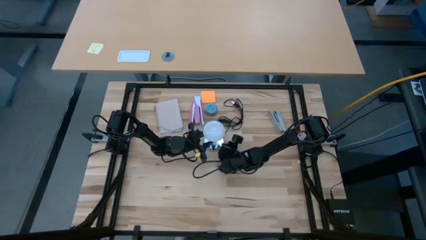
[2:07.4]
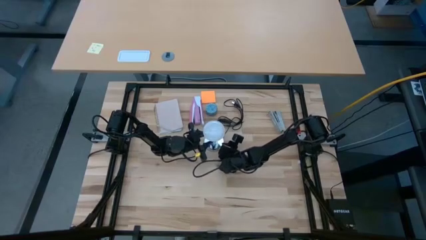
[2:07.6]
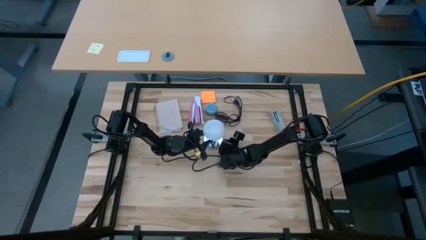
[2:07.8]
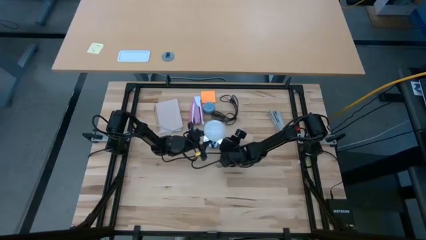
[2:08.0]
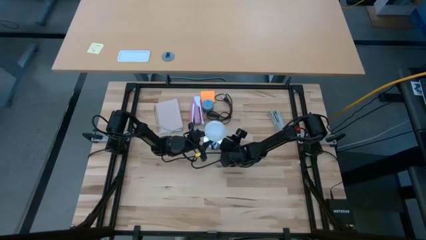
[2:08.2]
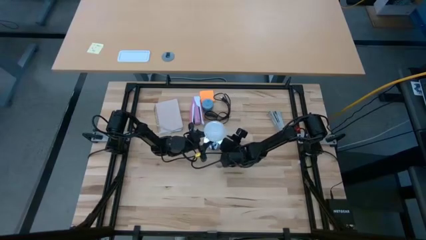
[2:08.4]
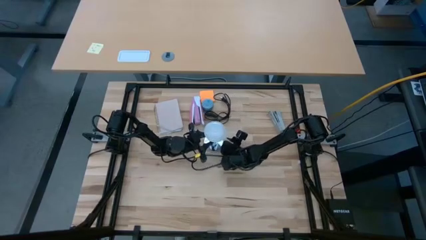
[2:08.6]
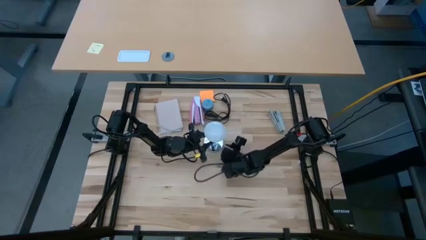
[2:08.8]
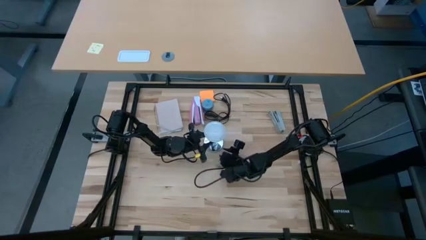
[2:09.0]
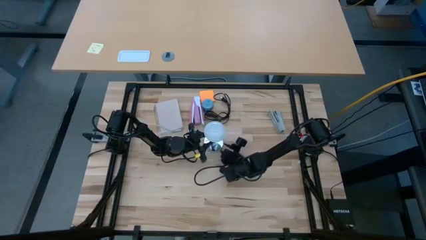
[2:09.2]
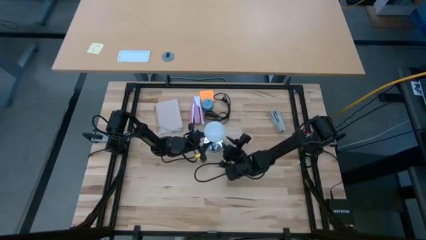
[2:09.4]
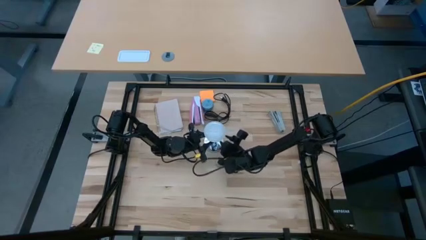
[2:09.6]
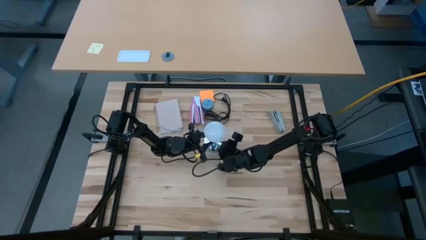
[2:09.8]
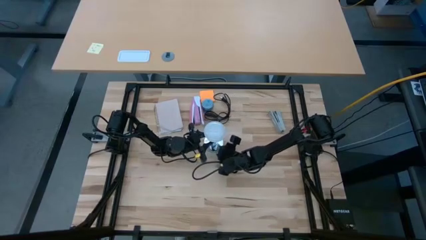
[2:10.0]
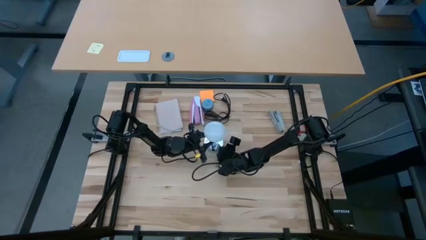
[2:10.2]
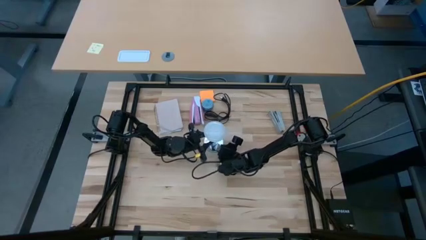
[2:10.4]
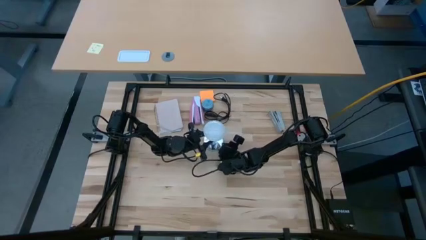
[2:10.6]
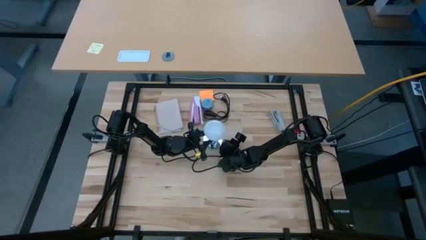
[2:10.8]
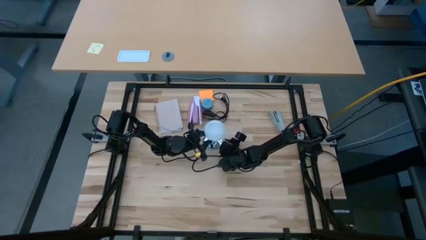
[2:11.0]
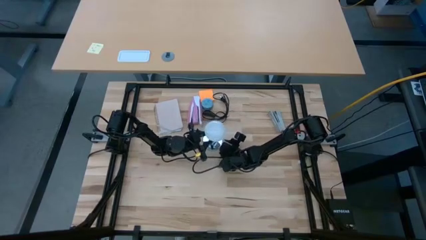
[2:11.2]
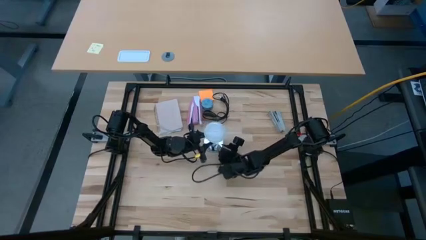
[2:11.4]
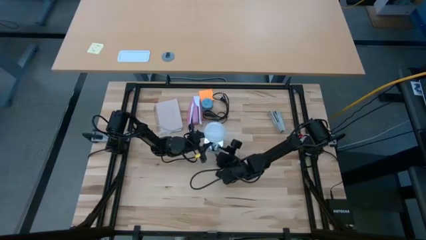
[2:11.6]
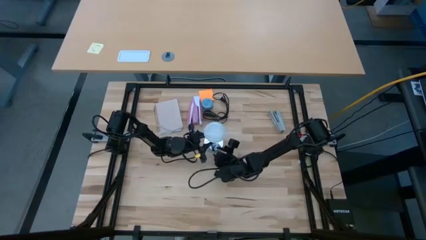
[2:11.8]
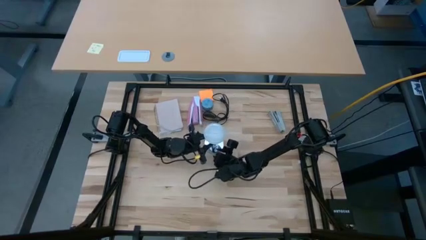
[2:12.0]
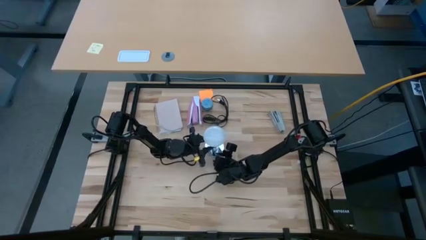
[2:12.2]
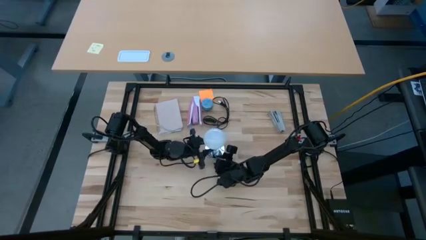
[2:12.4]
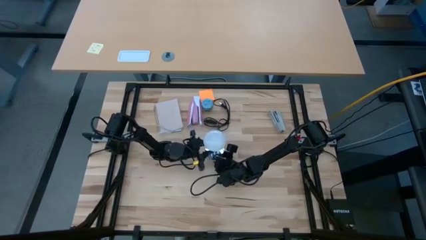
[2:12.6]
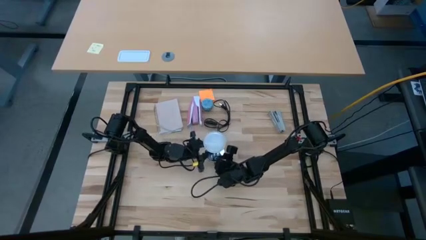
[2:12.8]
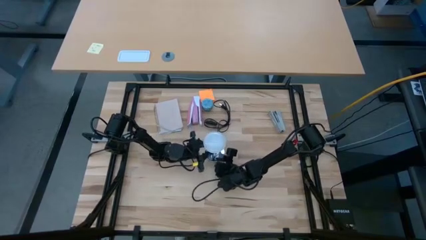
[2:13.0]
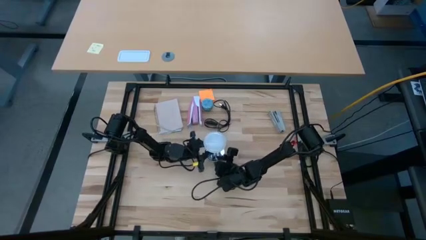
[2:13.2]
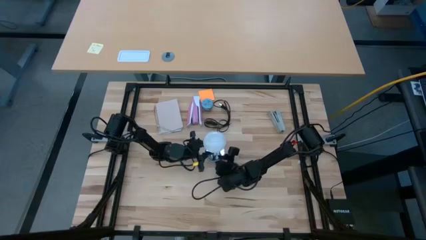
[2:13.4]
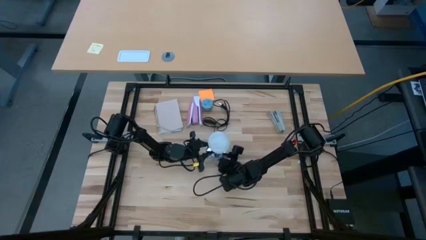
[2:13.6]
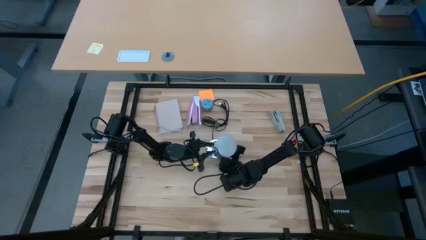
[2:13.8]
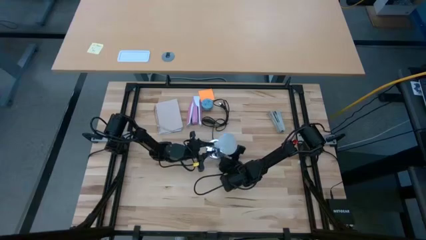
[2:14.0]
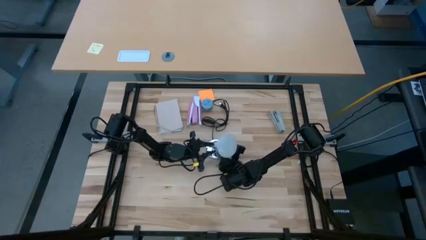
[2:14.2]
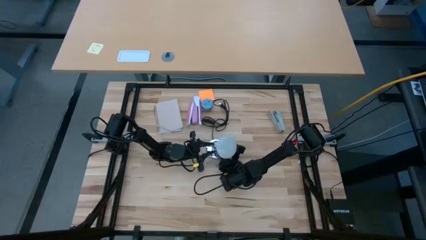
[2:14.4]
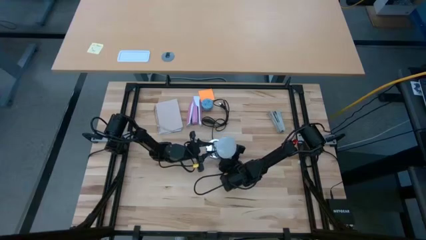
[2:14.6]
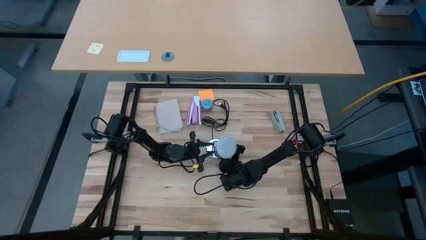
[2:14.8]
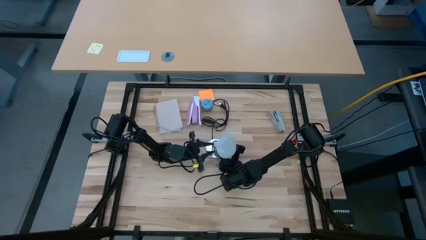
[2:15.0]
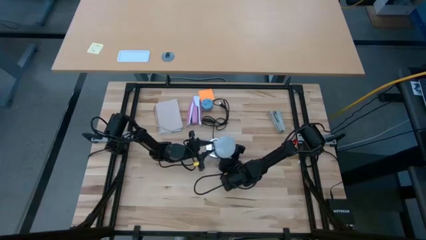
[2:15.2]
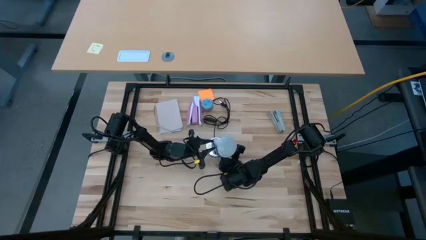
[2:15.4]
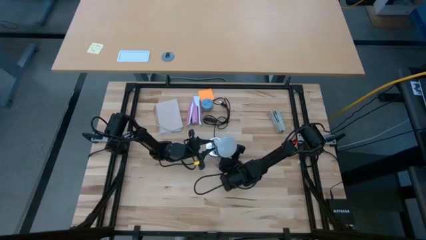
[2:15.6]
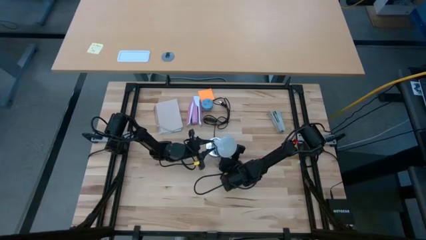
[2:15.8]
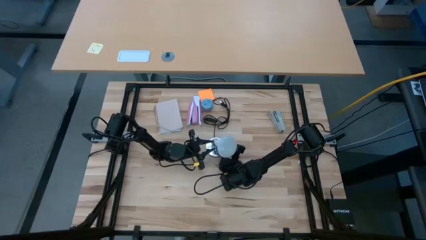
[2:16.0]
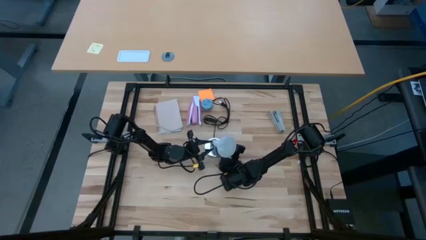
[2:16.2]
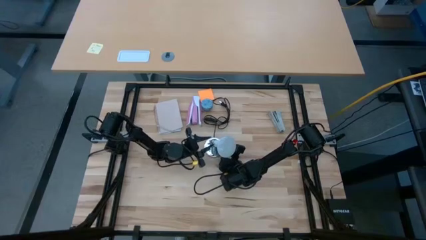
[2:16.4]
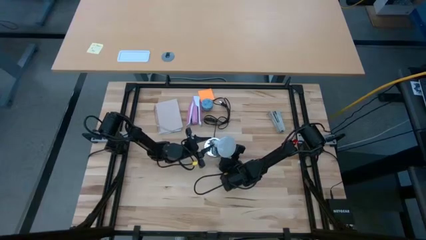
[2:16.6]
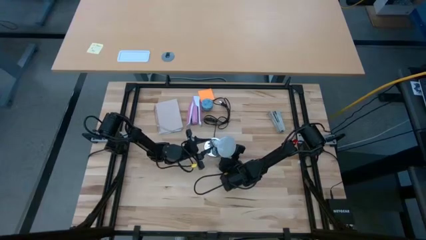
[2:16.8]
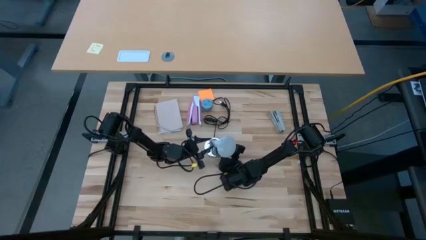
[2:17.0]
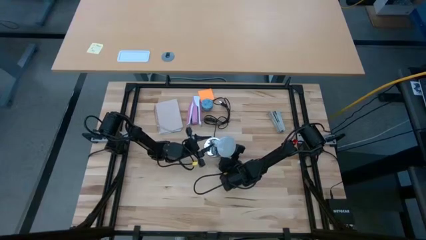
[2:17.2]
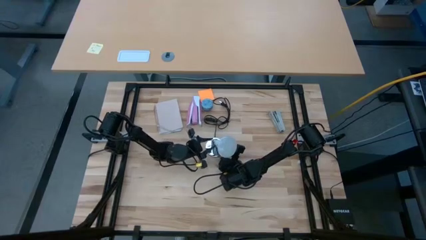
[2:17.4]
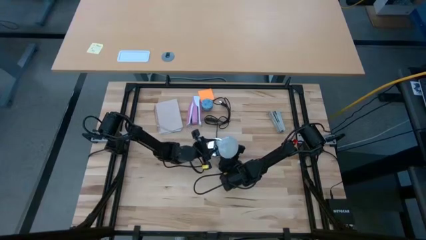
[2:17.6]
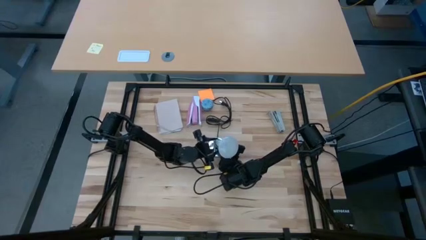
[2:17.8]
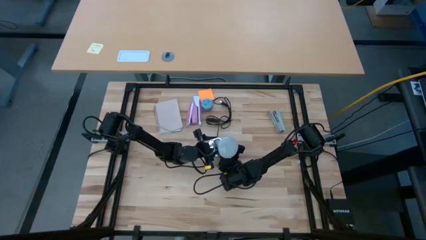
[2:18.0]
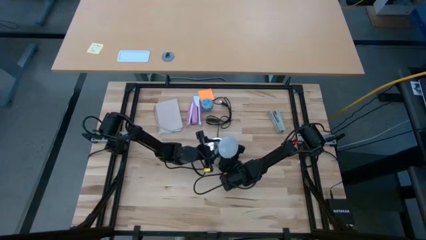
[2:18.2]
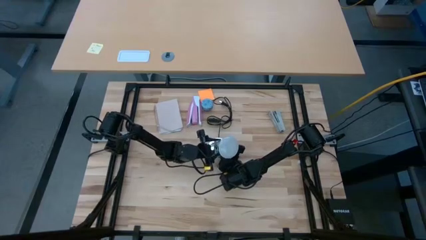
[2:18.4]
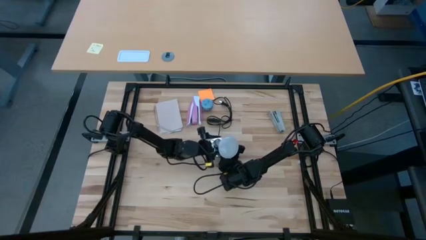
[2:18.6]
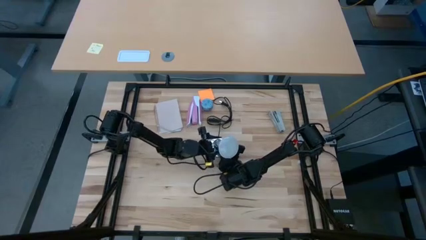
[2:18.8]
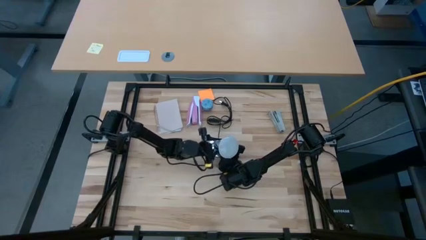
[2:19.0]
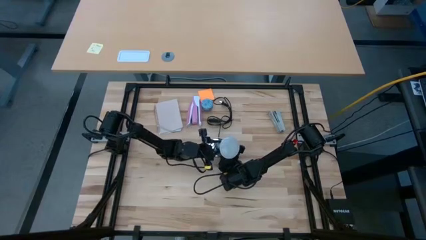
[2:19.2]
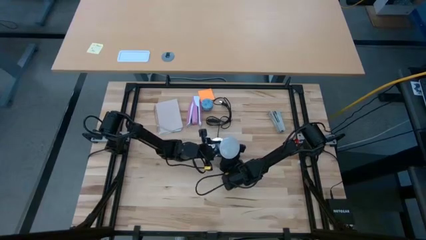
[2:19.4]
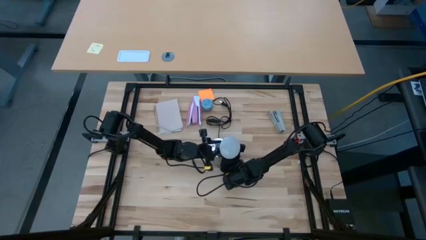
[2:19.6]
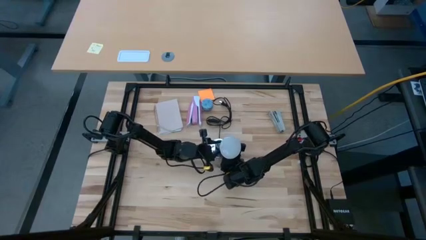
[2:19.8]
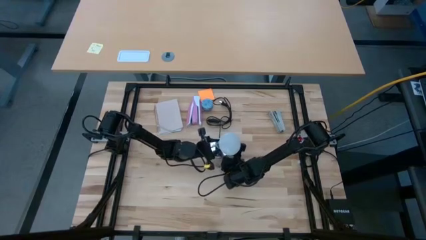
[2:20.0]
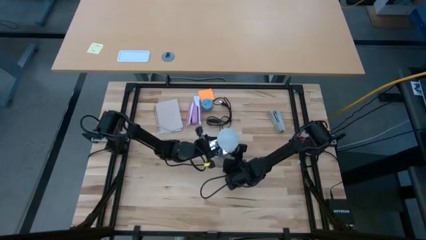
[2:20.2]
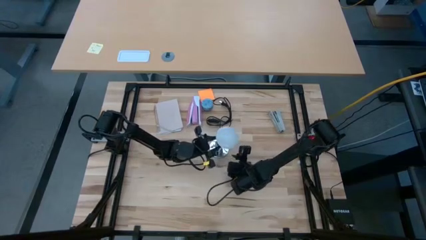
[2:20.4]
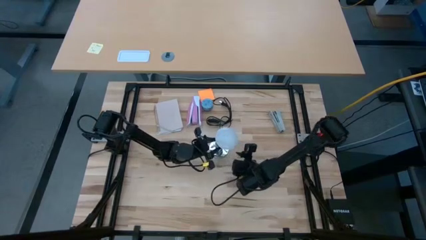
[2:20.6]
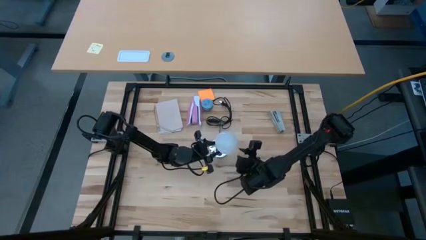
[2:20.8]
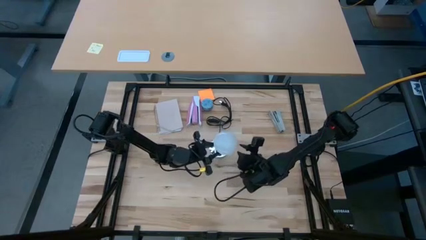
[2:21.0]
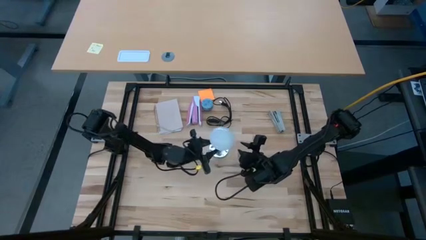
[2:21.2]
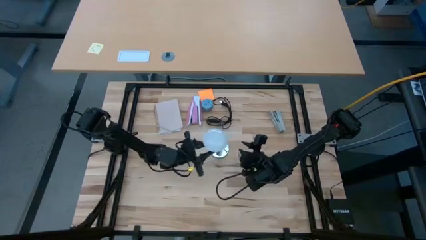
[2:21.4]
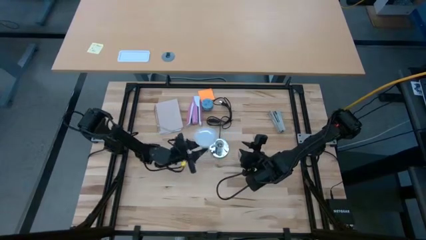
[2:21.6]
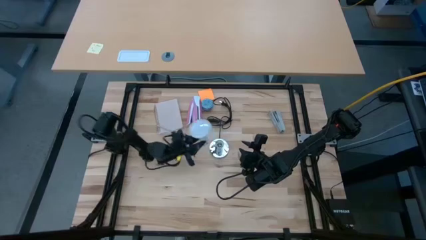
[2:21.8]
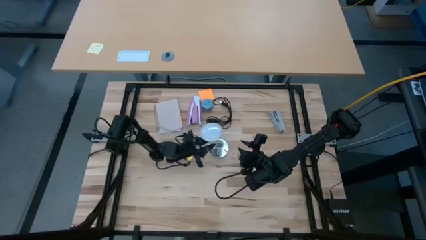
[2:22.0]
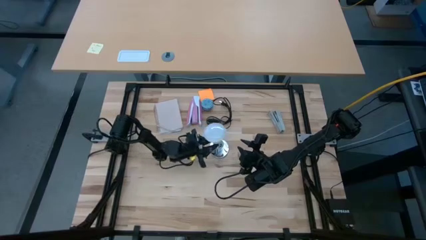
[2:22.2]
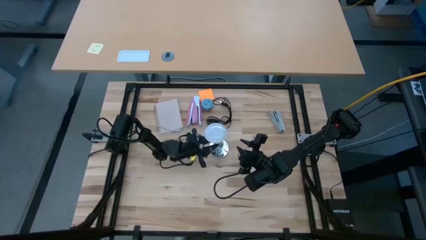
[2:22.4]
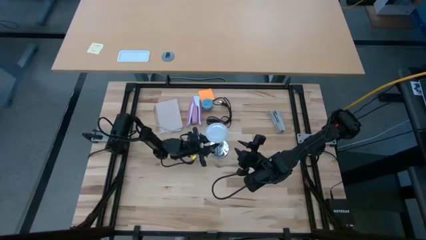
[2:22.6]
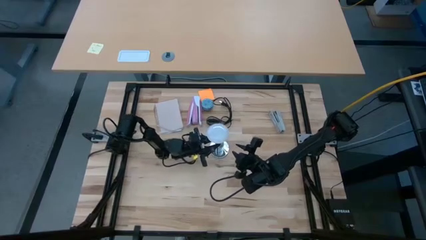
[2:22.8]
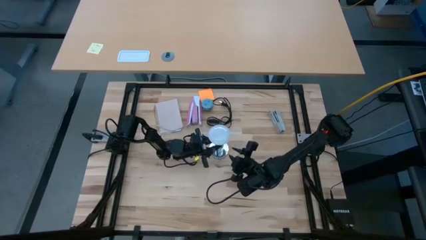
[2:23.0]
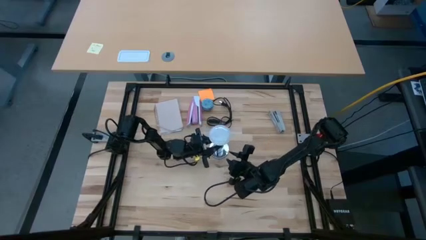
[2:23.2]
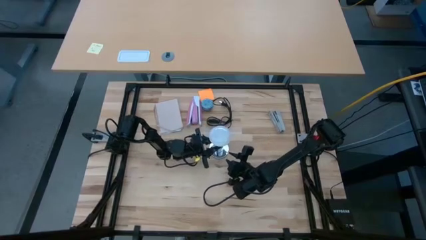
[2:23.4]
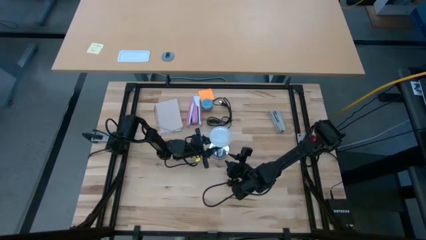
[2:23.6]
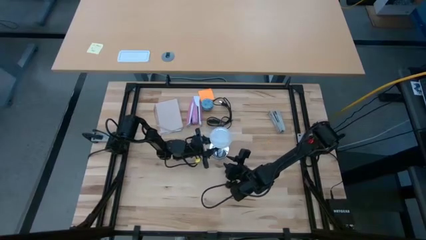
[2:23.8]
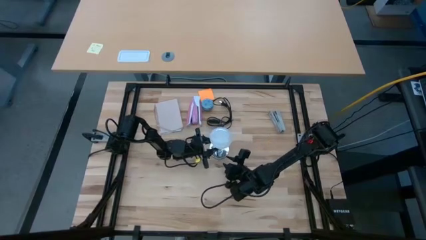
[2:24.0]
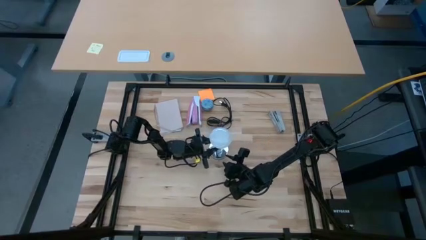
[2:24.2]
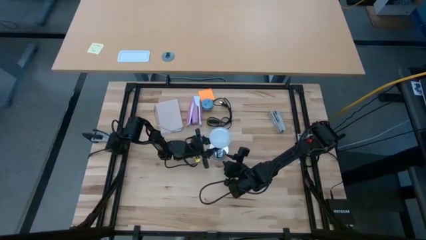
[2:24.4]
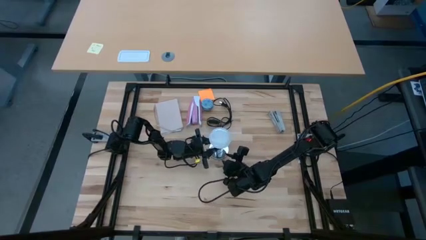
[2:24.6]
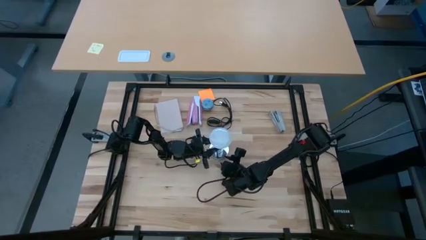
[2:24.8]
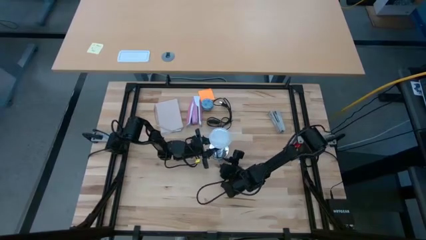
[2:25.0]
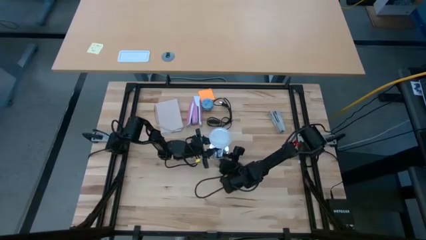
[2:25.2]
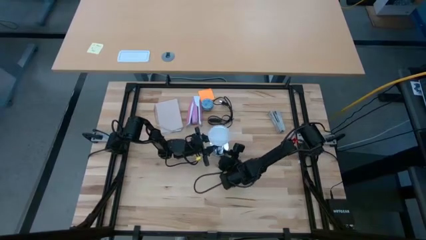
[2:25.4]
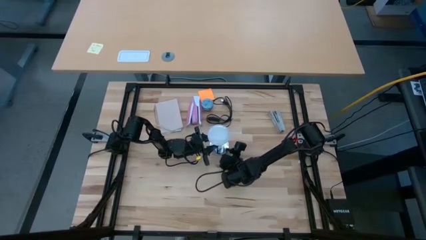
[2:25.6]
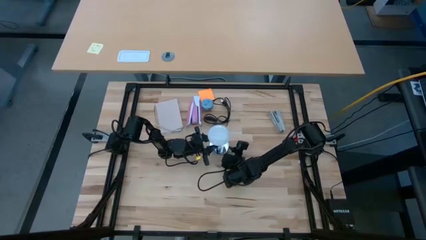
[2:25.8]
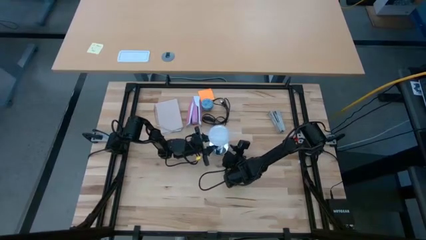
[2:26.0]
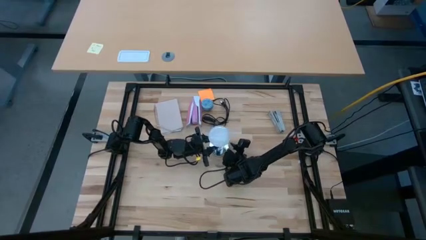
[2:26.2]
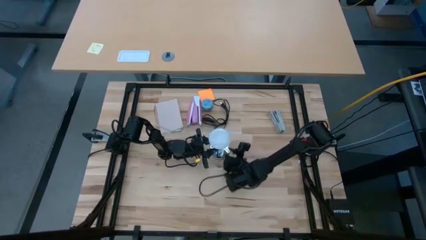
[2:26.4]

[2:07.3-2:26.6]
Task: Screw lightbulb
Insert the lightbulb into the lamp
